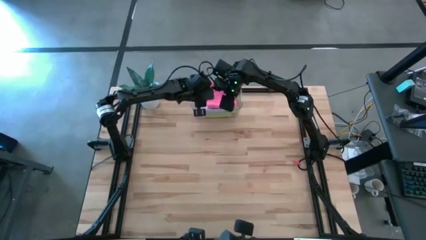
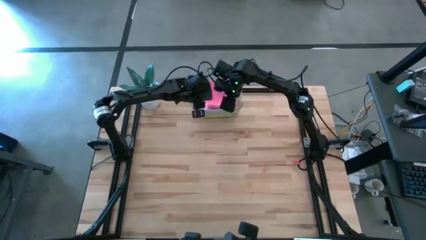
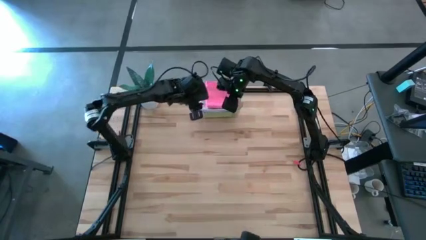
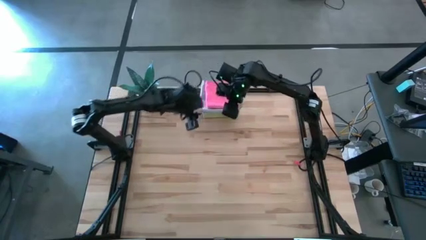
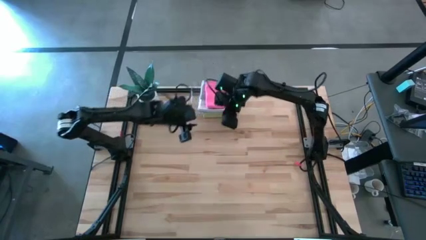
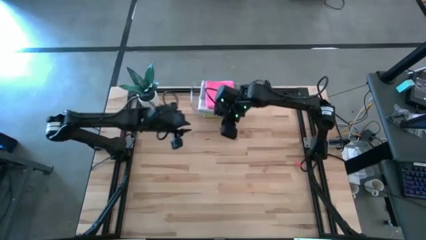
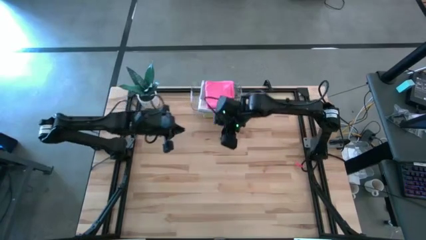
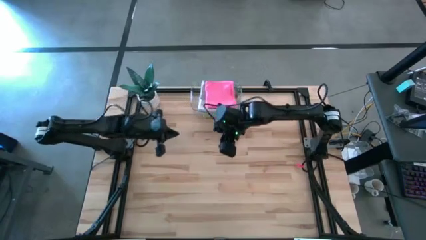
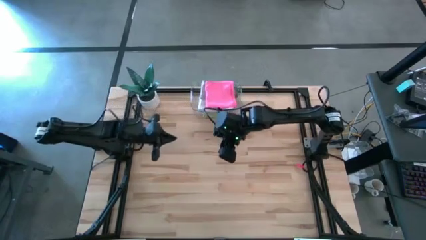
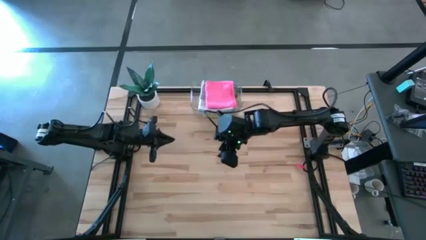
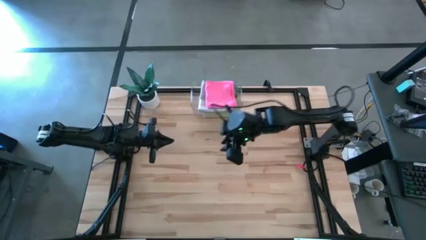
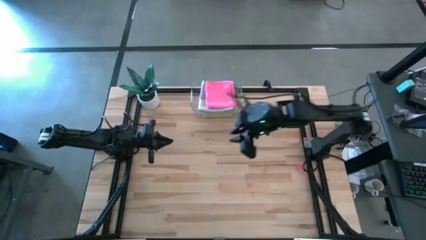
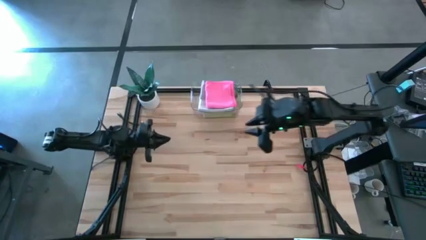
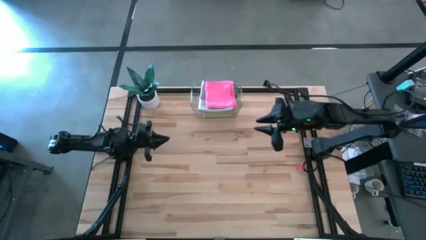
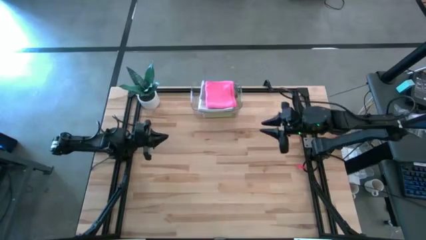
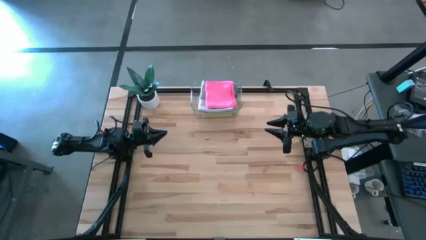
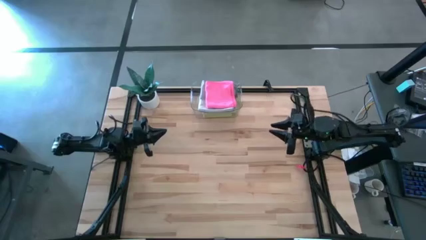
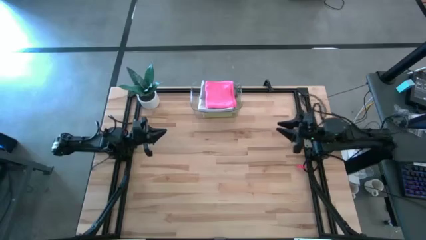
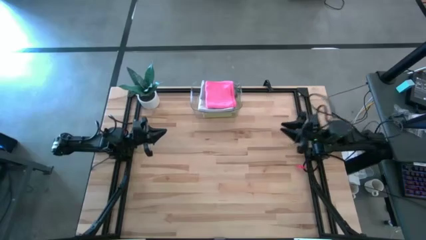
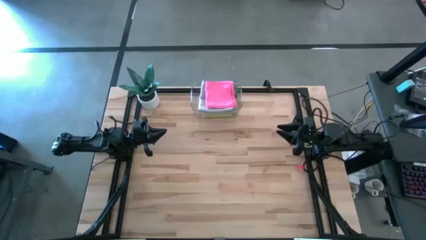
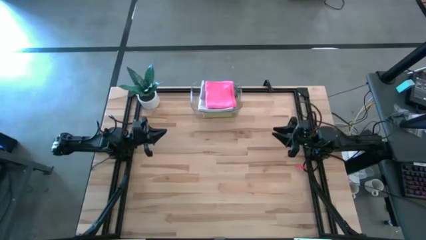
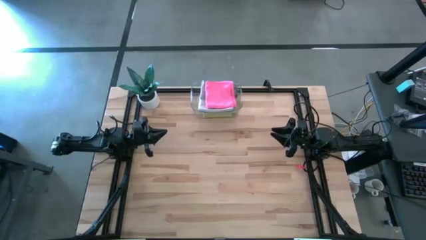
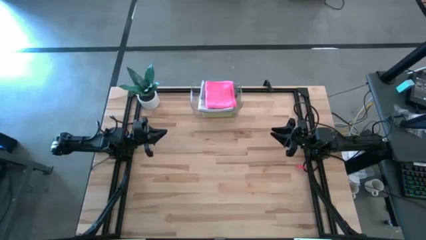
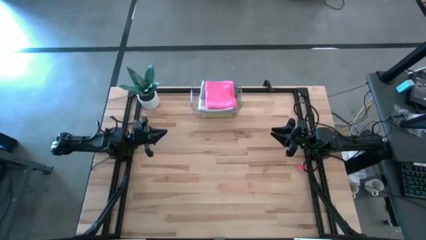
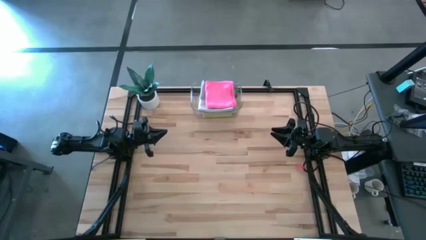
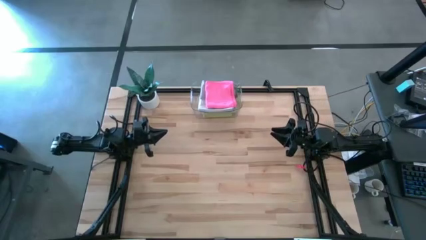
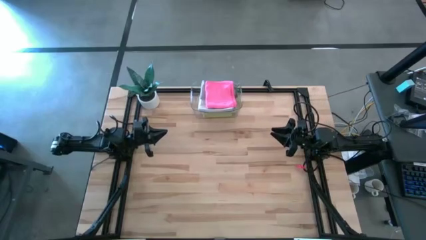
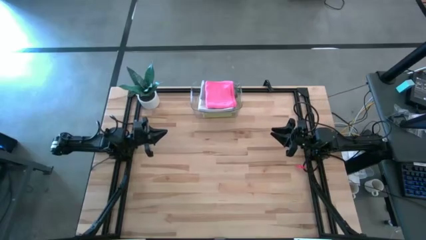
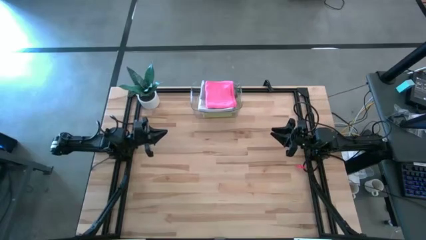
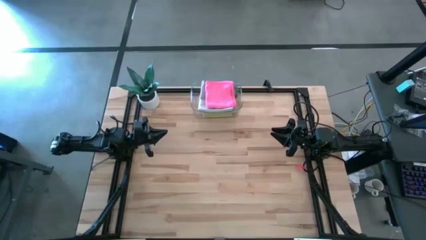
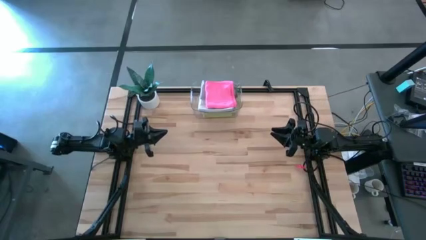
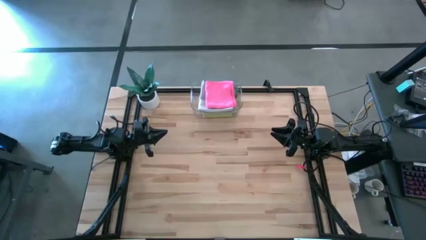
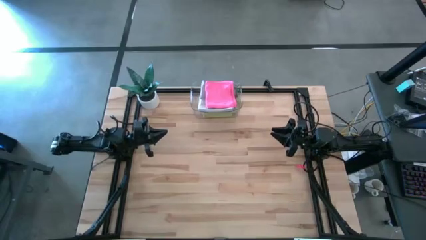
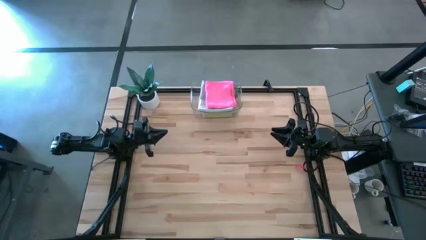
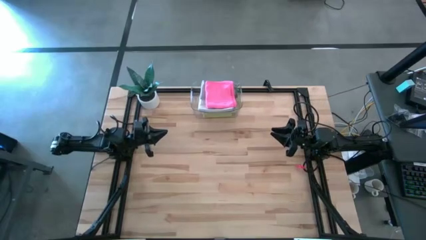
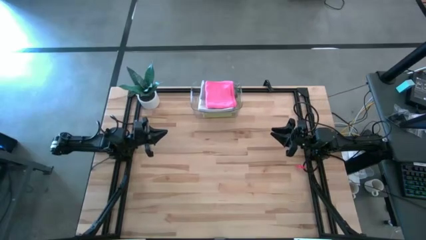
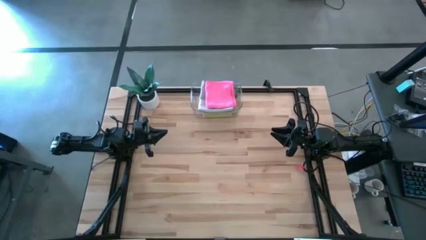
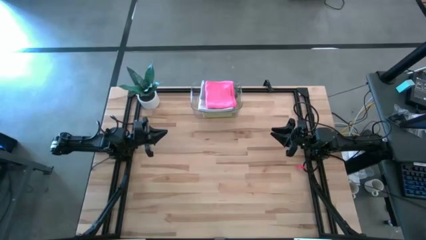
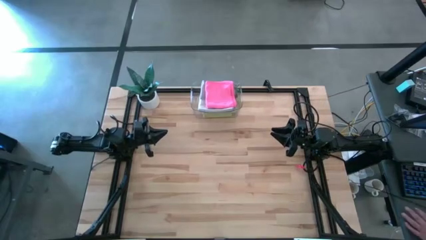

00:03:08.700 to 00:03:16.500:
Task: Fold microfiber towels
Return to Home Position

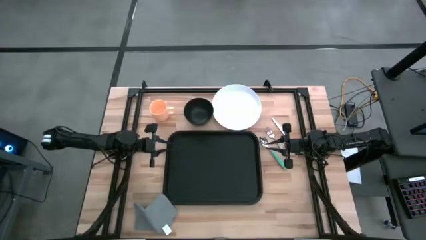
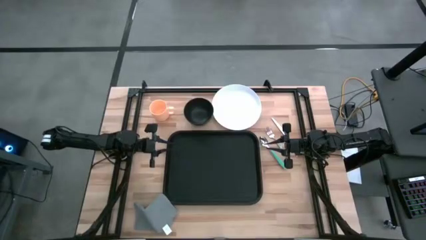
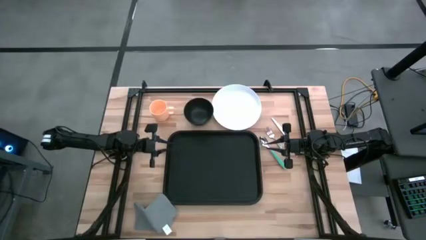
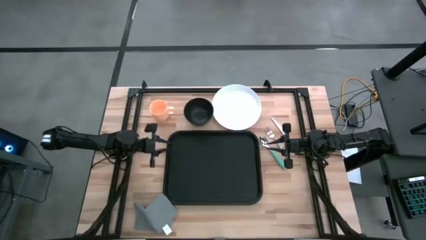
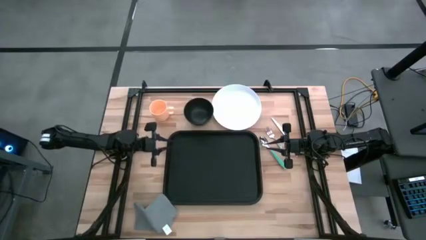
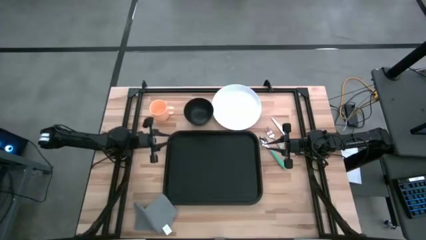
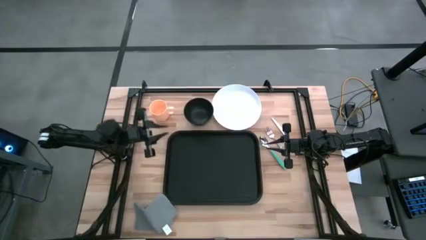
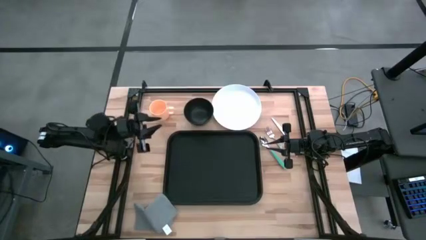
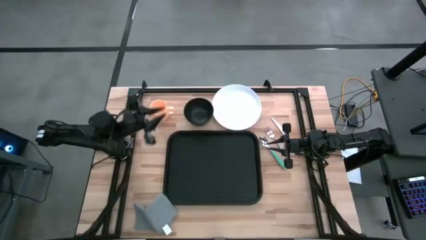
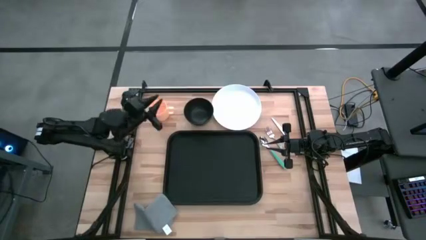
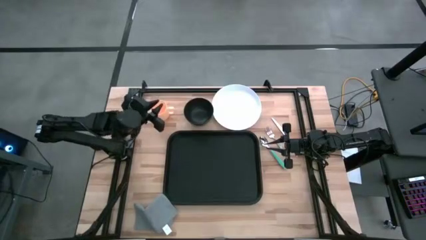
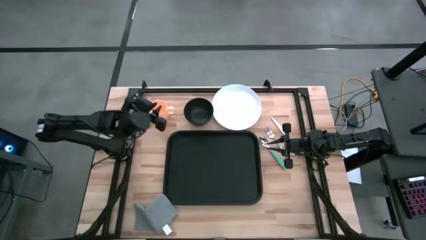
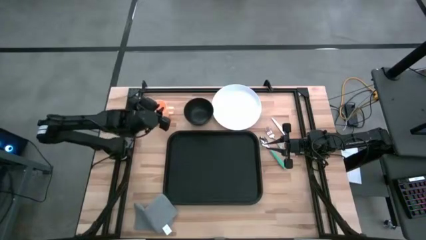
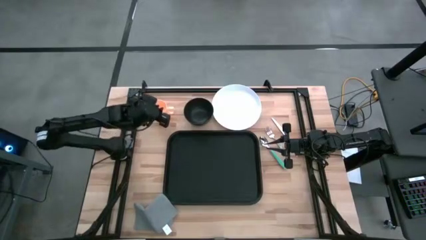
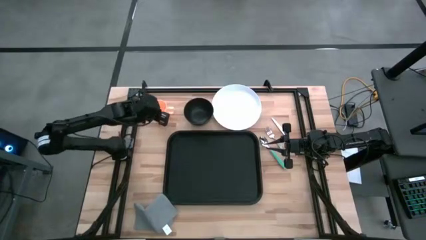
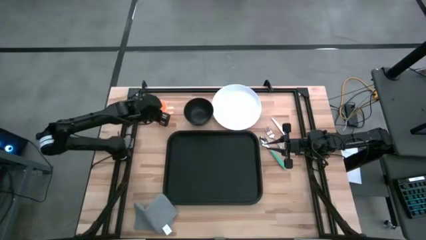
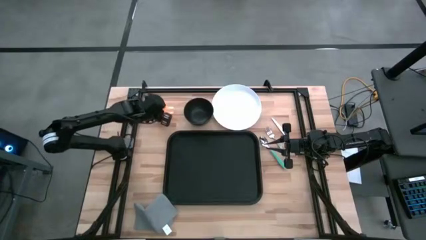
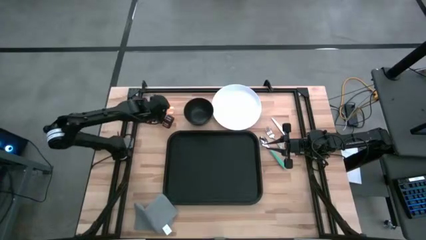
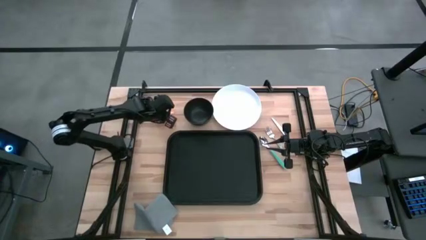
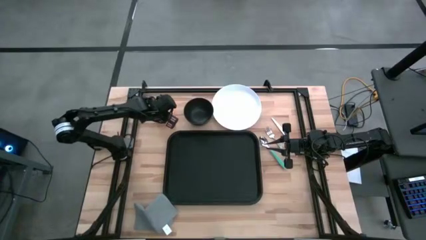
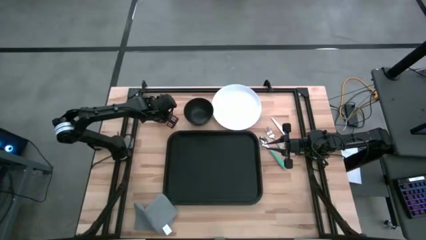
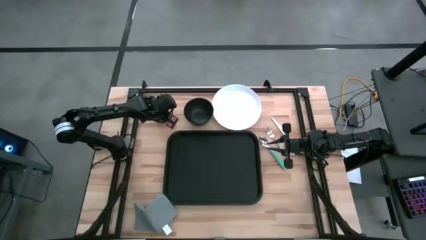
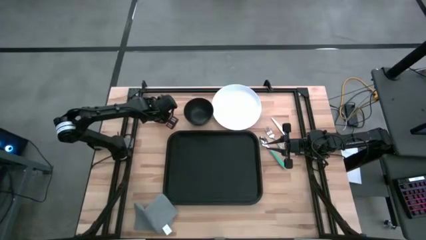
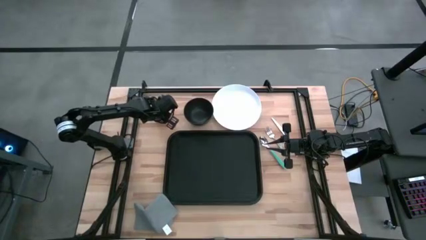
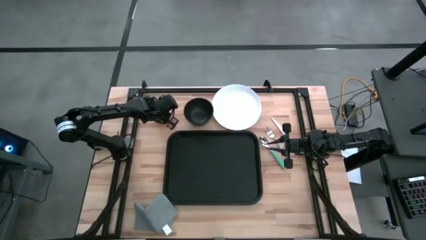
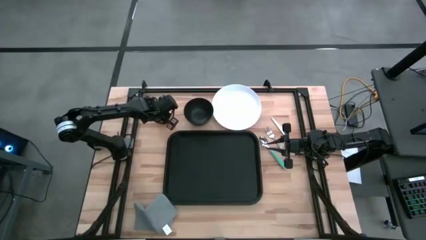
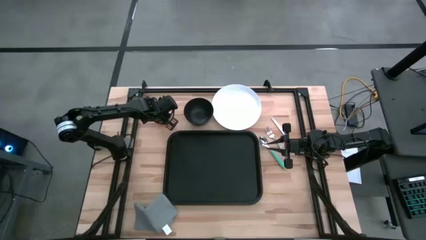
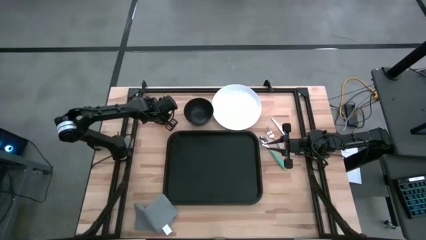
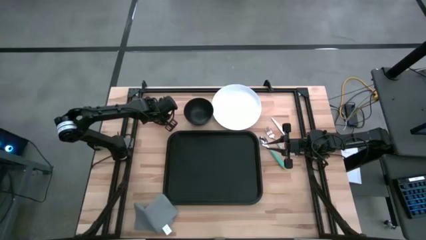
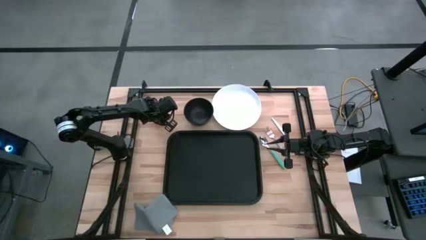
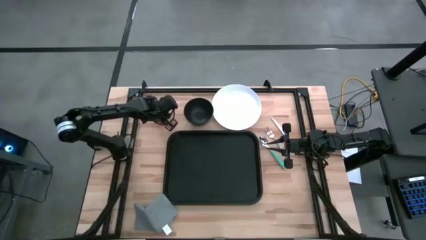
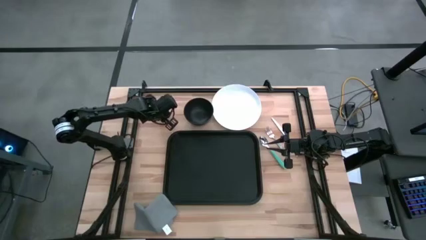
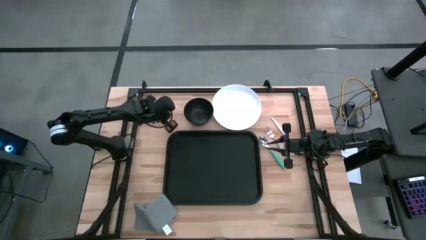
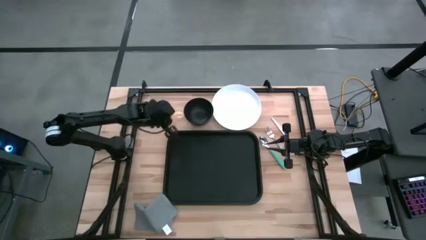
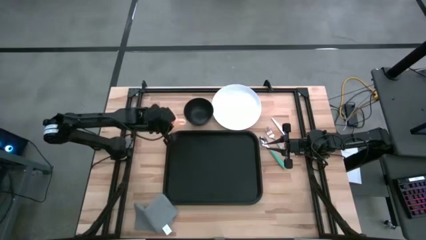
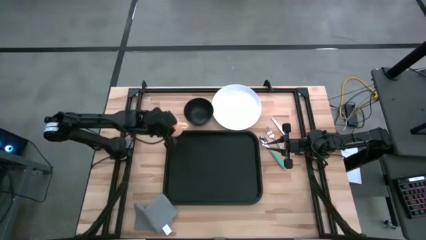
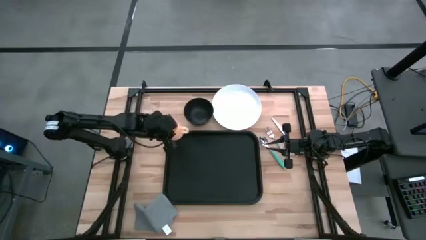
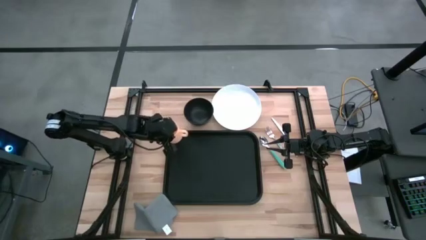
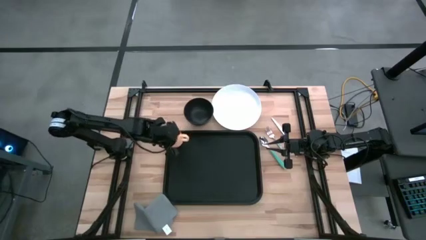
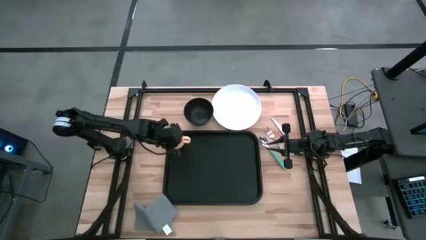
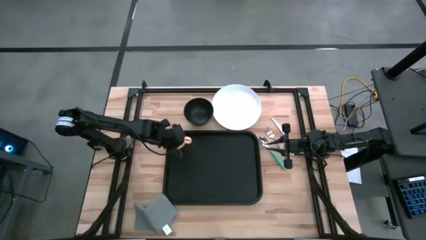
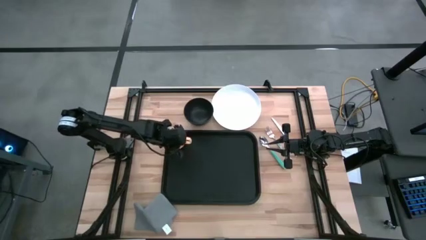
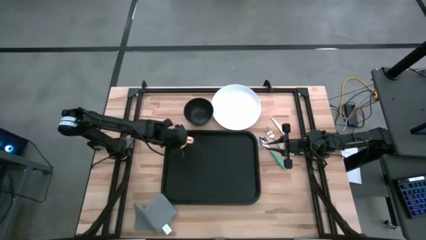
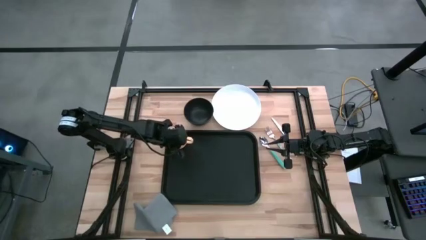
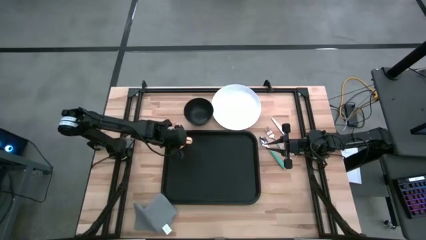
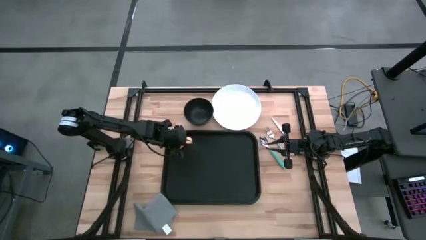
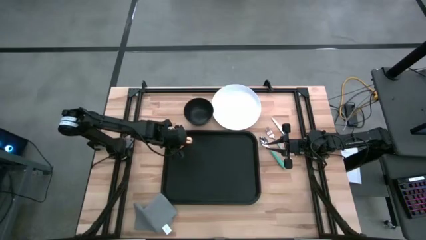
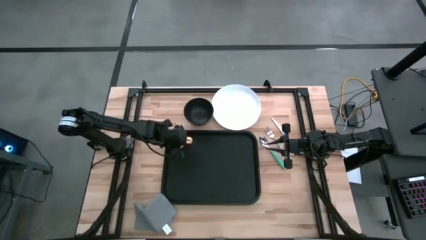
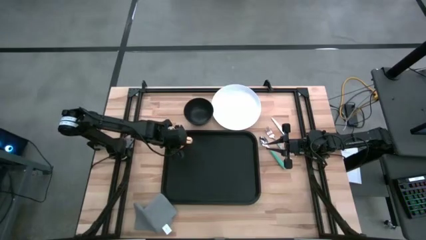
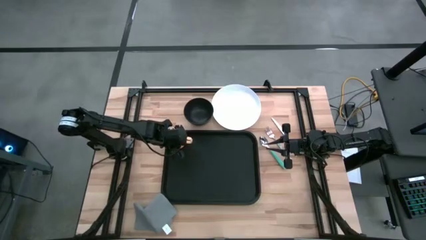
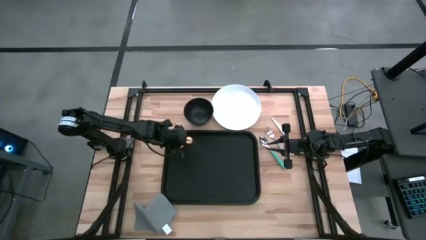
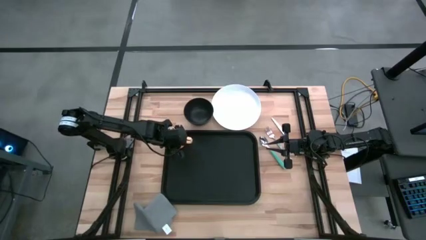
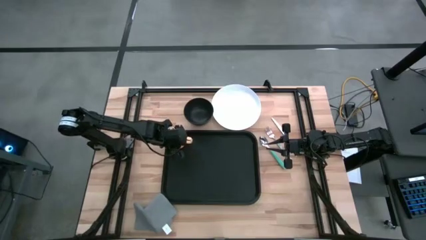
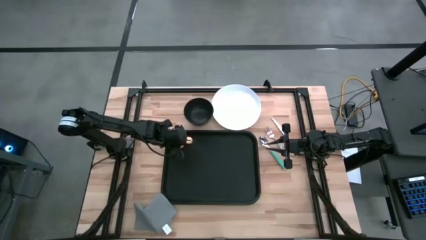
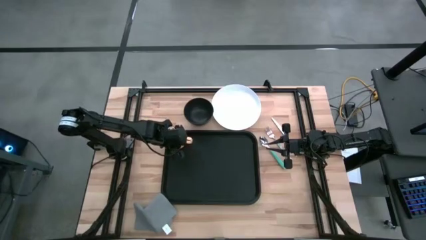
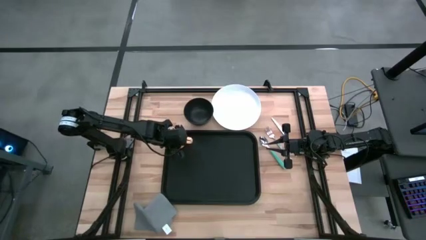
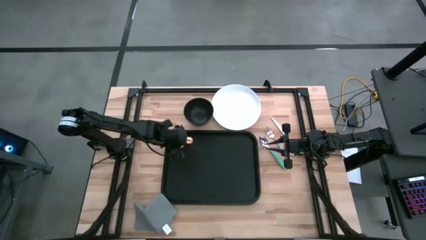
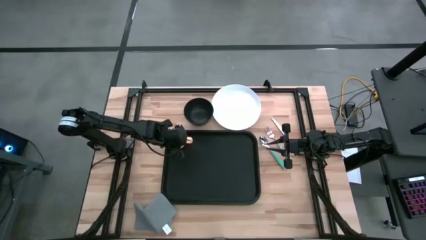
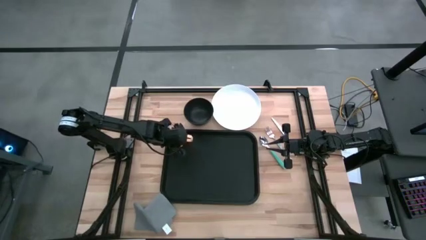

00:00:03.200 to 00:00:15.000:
Task: Set up tray
Put the yellow cup on the black serving tray
